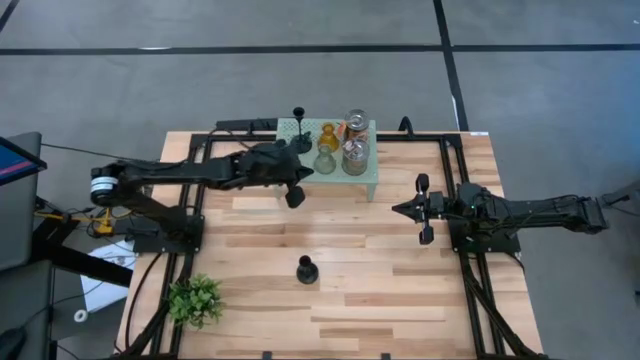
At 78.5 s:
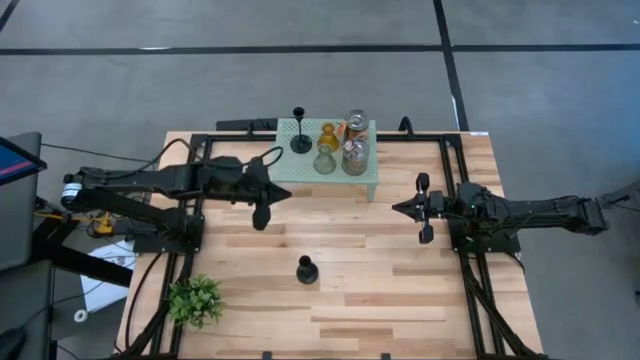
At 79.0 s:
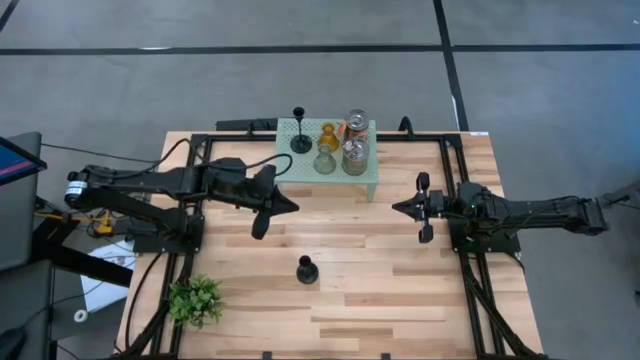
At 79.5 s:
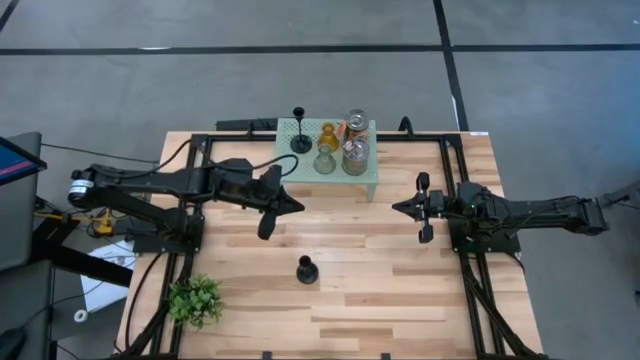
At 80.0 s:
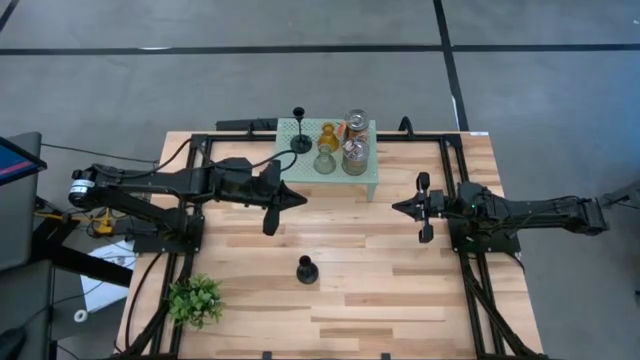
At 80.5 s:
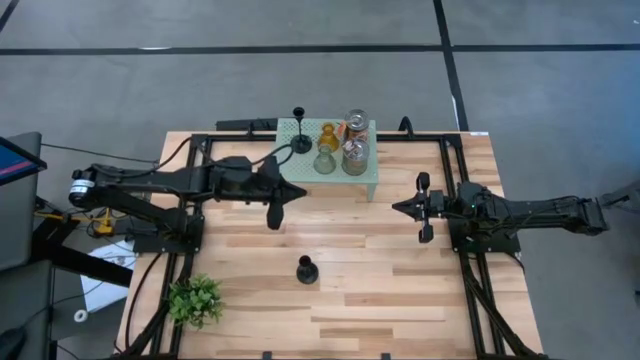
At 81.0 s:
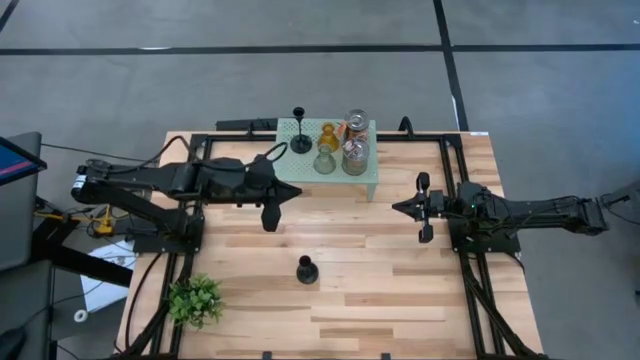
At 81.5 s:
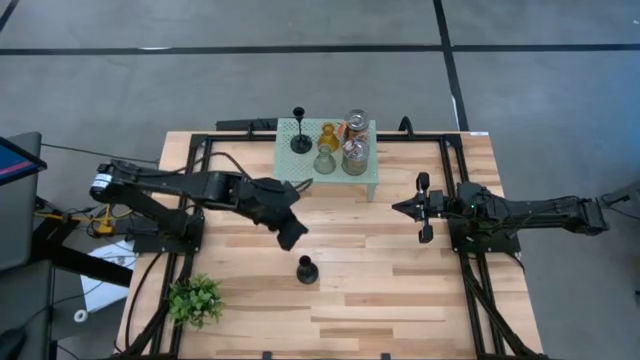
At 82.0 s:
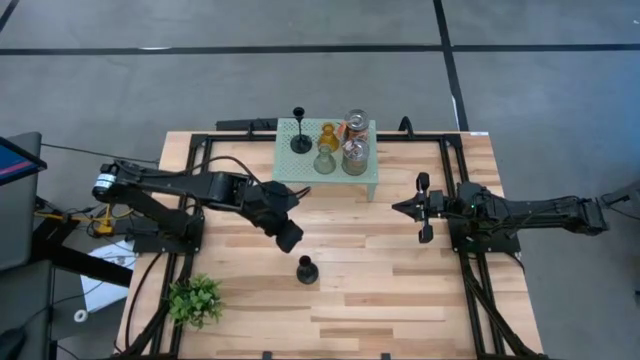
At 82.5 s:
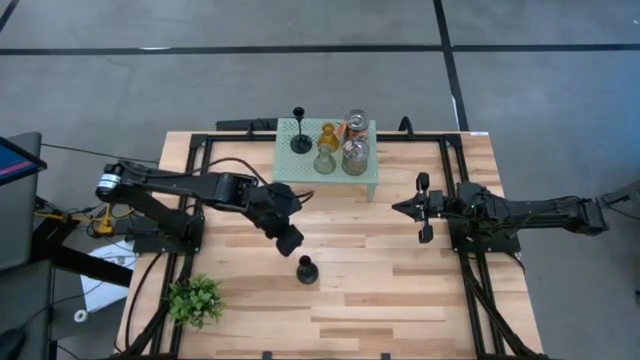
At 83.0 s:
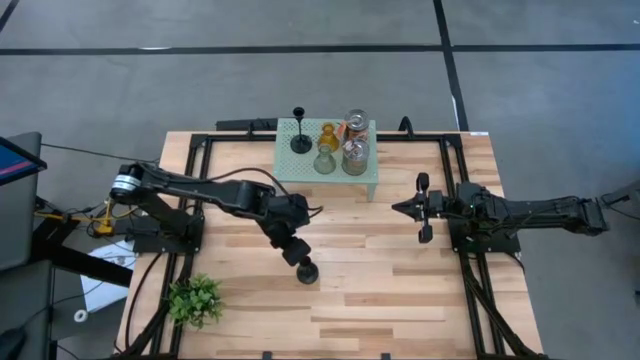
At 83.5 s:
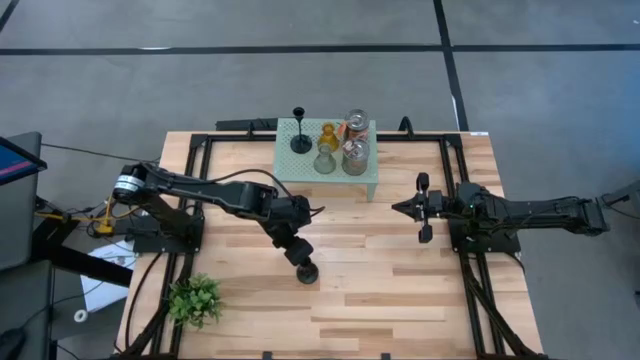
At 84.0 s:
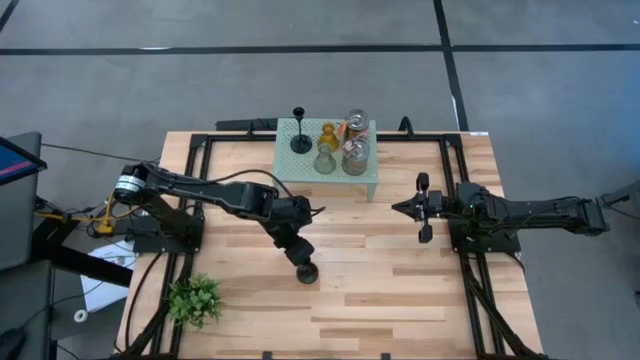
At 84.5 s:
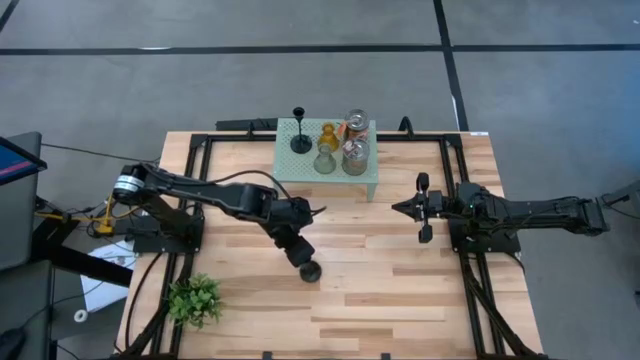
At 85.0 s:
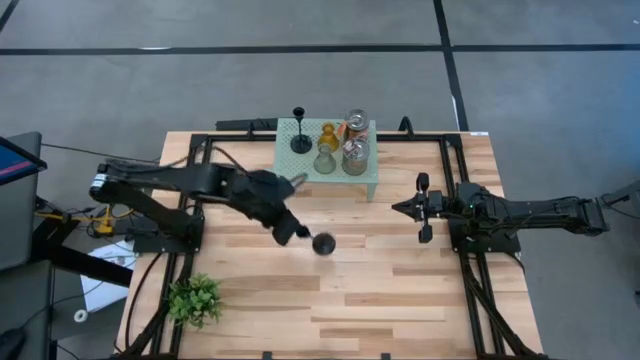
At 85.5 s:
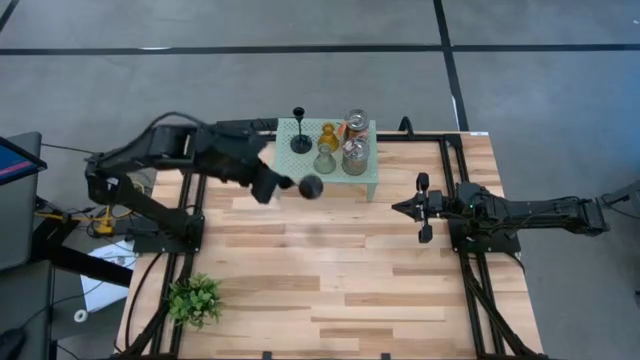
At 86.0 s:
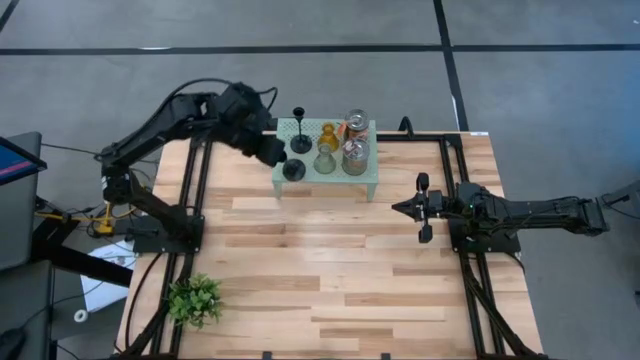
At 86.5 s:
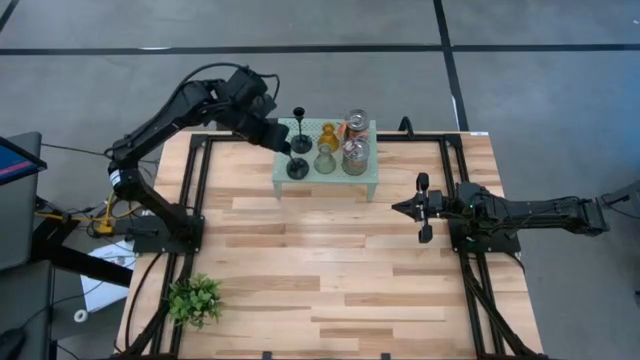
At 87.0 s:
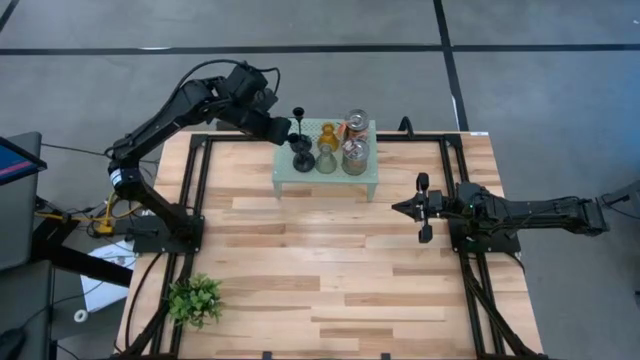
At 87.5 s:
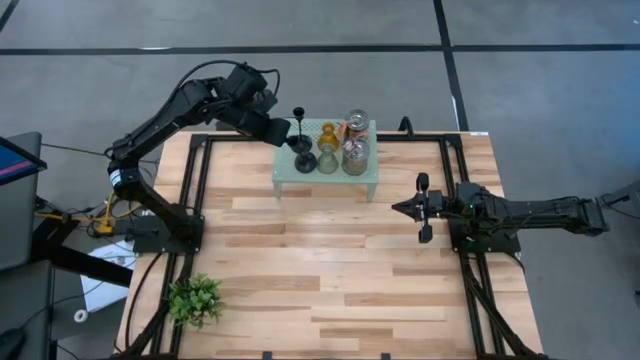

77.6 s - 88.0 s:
Task: Pick & Place candle stick holders
Put the black holder on the shelf aligned with the other black holder

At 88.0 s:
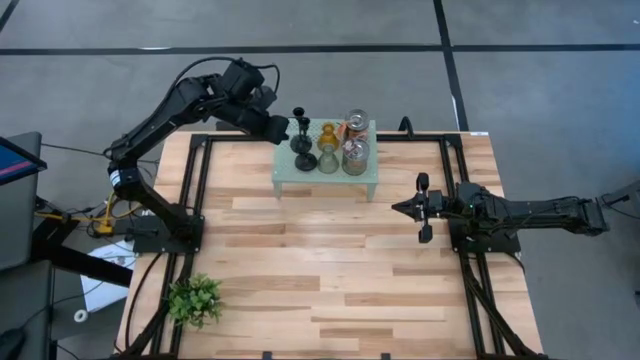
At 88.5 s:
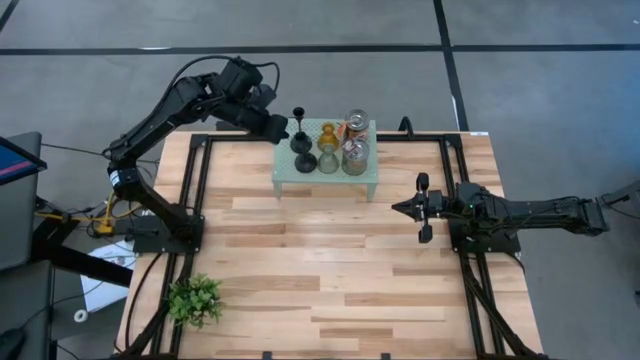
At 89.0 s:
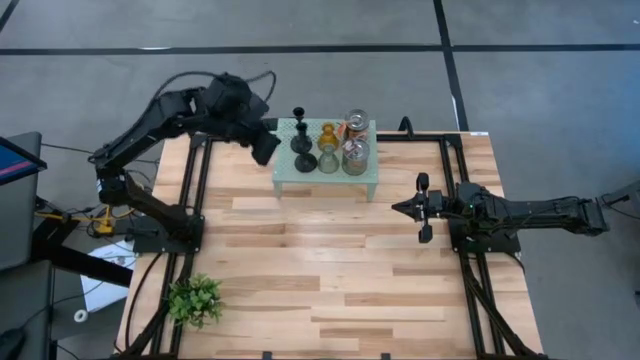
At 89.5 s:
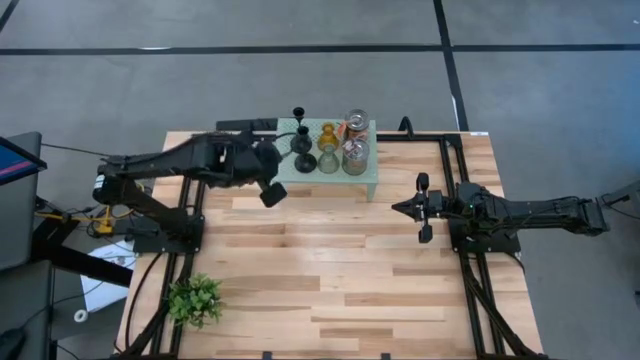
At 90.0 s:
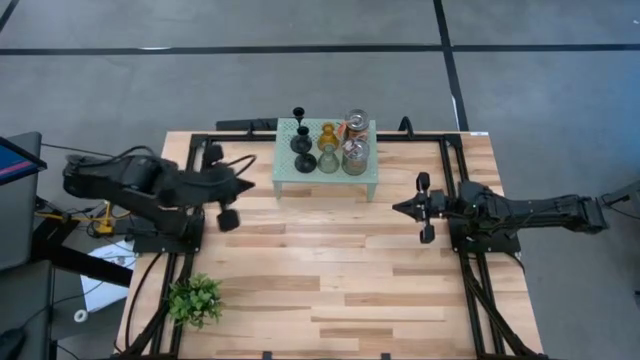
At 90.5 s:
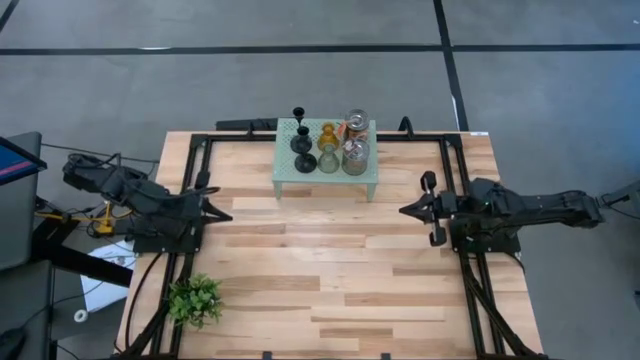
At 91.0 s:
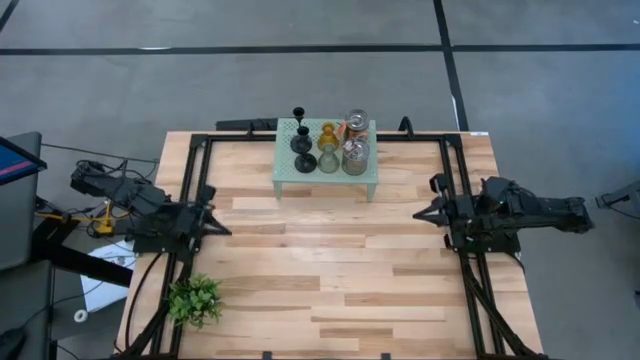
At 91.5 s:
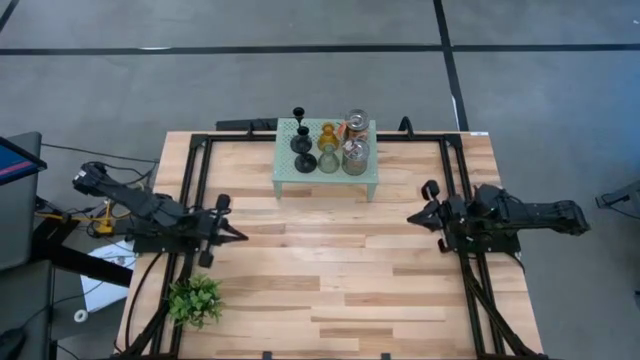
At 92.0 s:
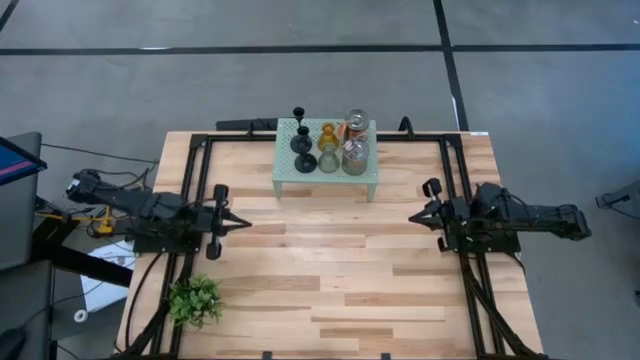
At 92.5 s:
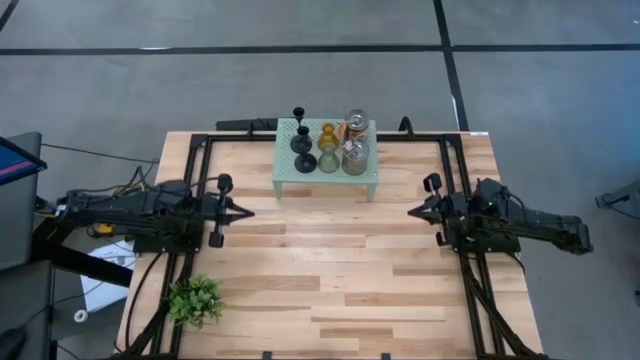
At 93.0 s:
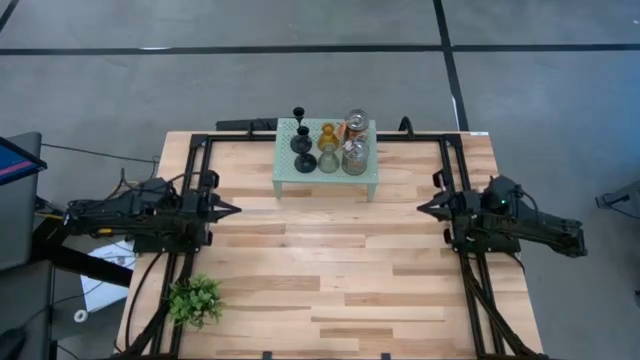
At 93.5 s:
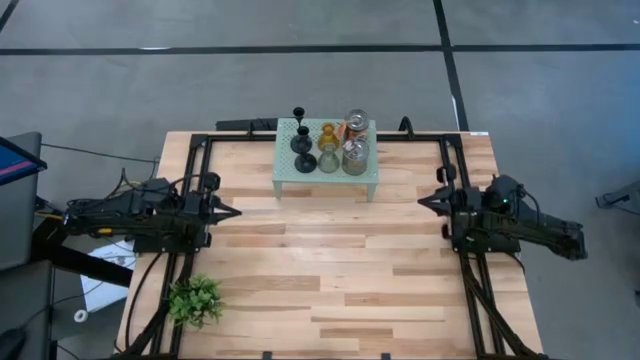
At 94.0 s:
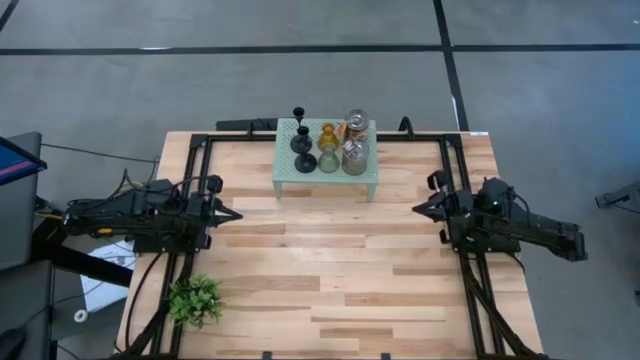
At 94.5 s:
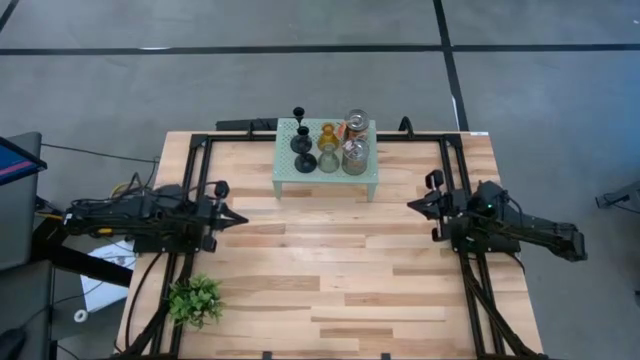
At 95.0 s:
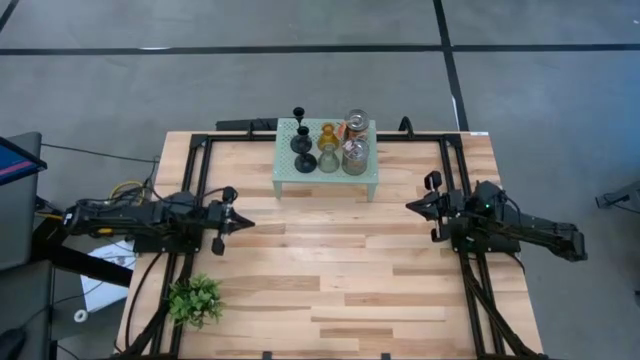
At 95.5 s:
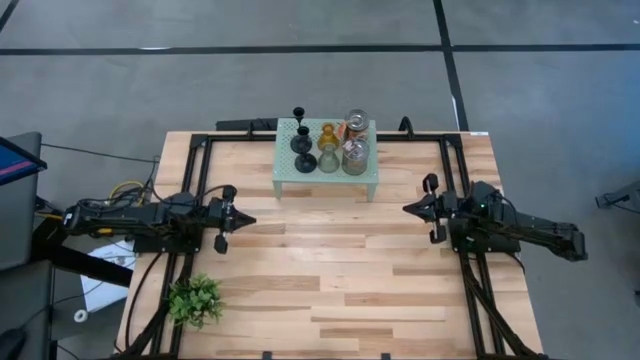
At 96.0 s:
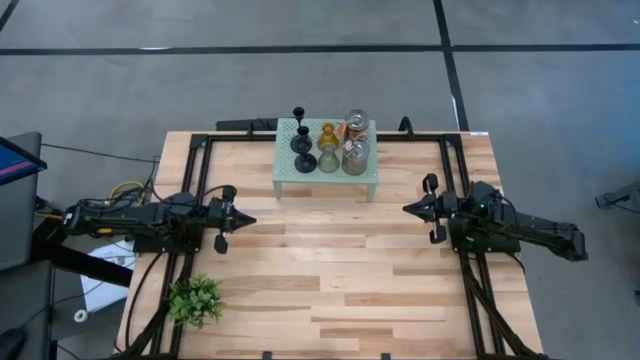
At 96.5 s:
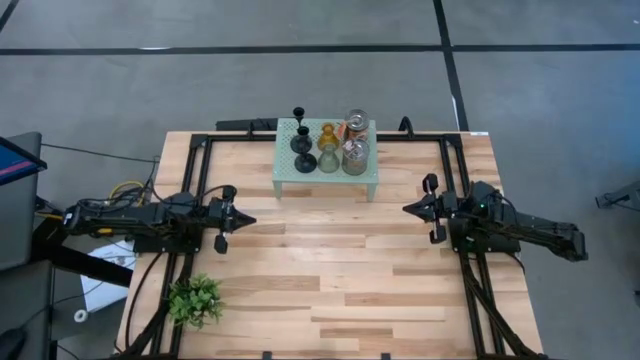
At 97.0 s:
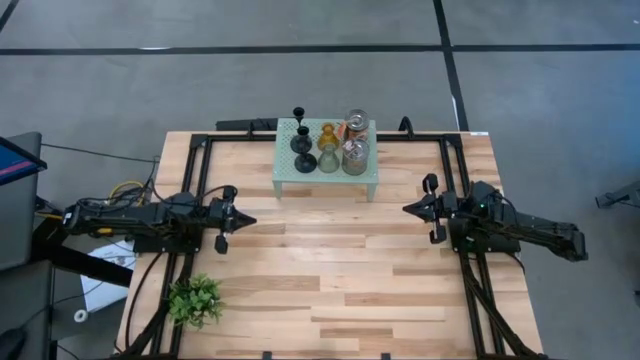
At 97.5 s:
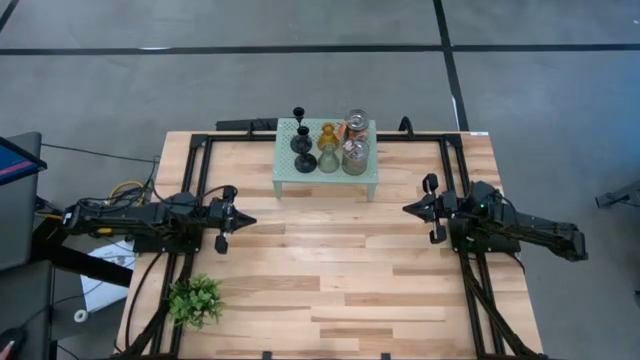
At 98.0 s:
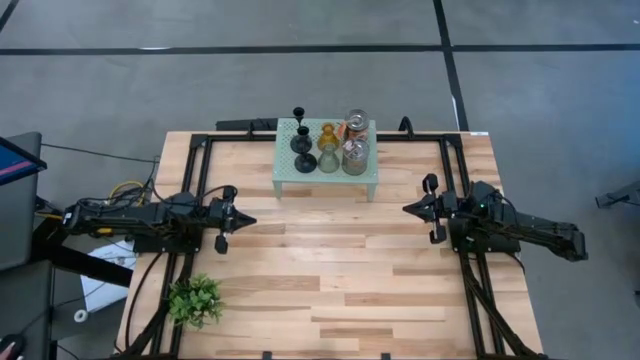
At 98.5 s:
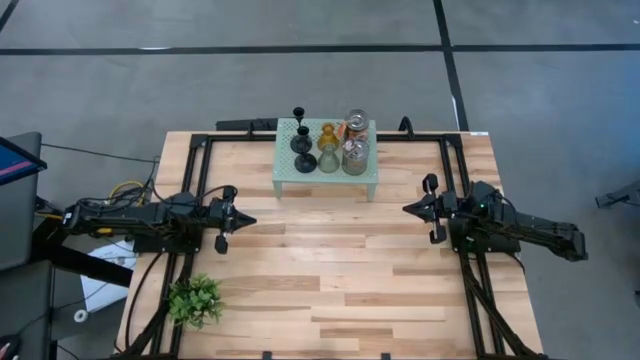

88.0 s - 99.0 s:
Return to Home Position

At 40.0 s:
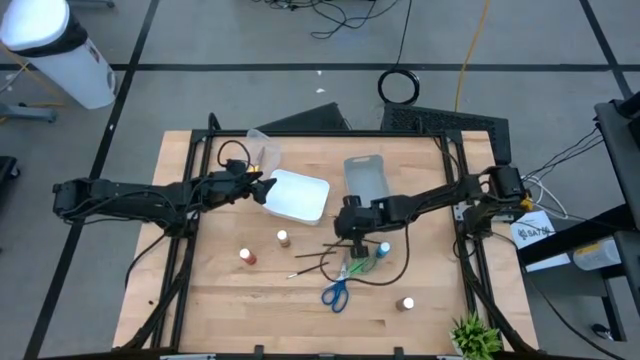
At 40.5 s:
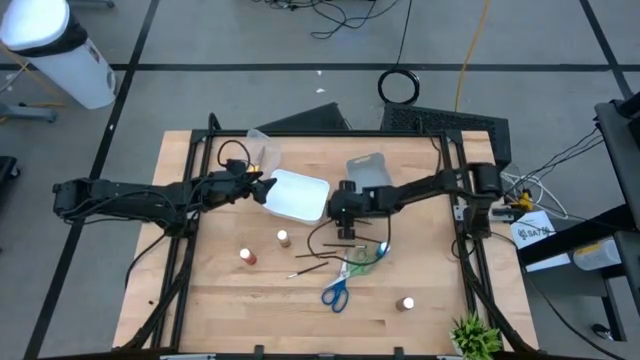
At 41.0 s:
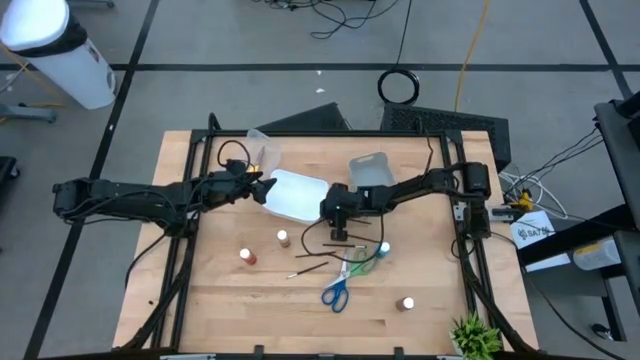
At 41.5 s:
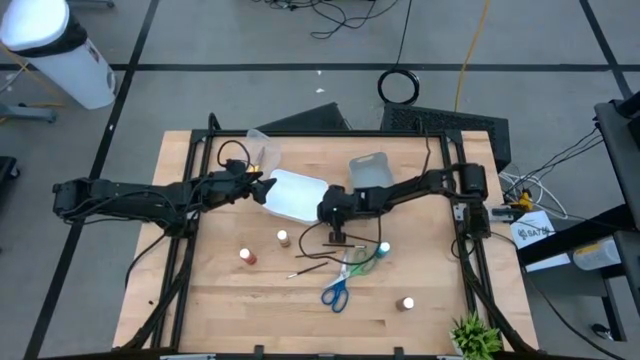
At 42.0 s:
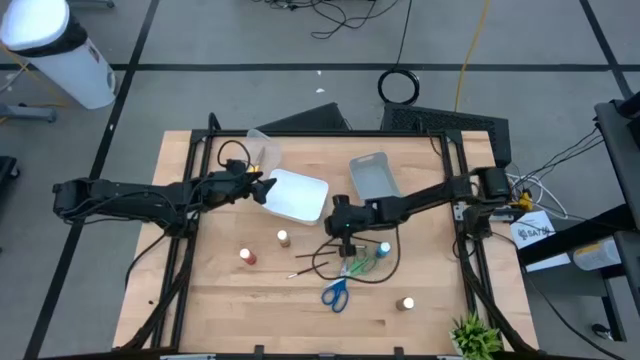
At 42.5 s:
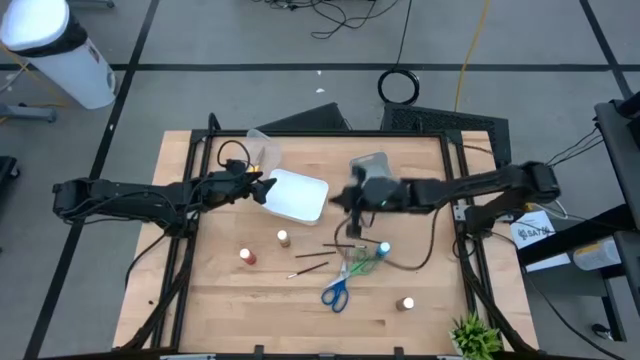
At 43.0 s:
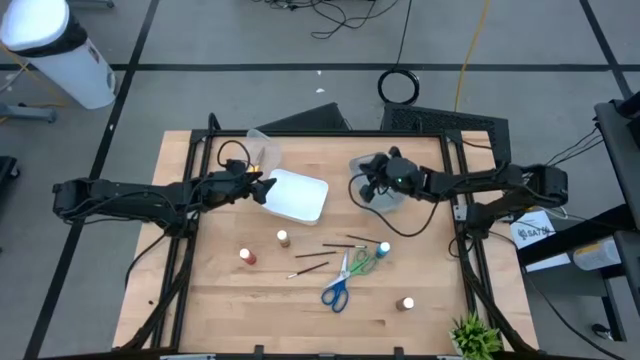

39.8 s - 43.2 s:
Task: Pick & Place Paint Supplies
Put the top gold and black paintbrush into the gray bin
